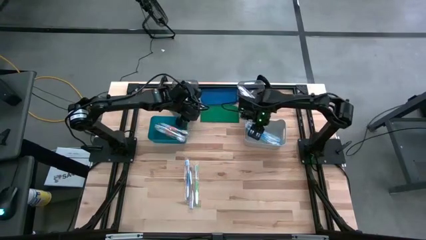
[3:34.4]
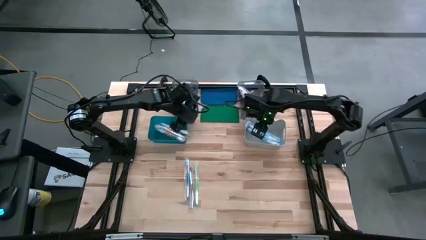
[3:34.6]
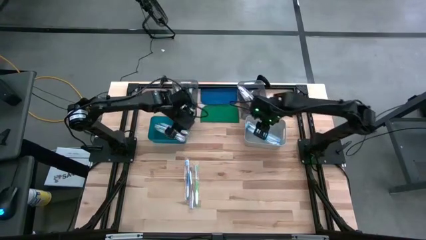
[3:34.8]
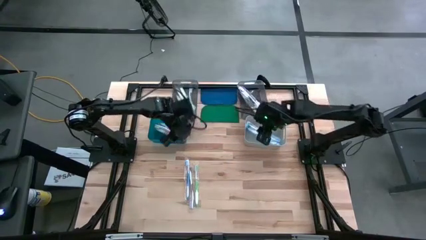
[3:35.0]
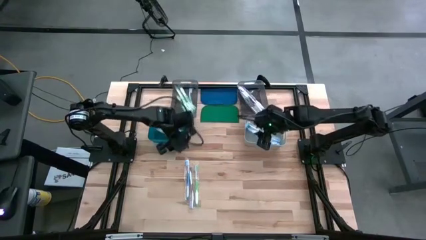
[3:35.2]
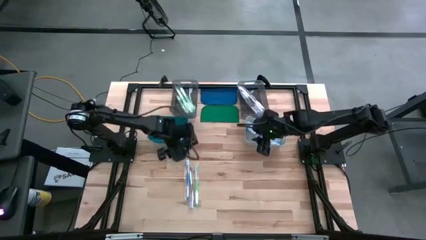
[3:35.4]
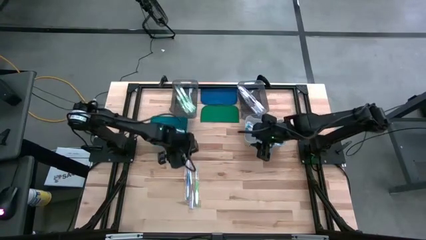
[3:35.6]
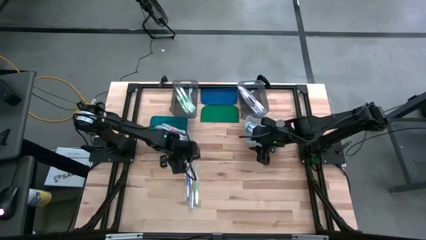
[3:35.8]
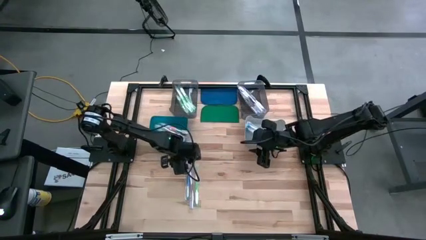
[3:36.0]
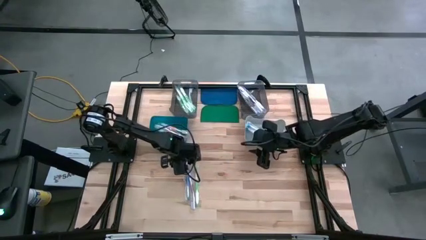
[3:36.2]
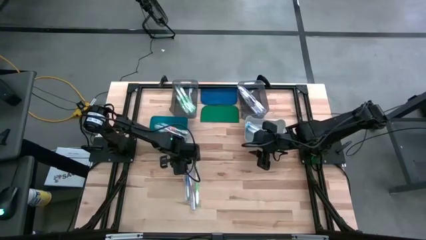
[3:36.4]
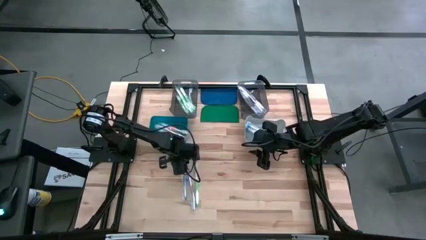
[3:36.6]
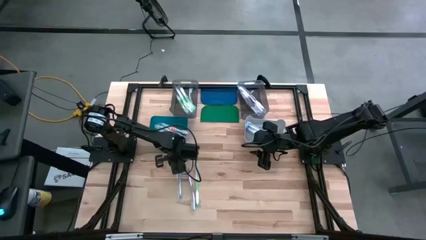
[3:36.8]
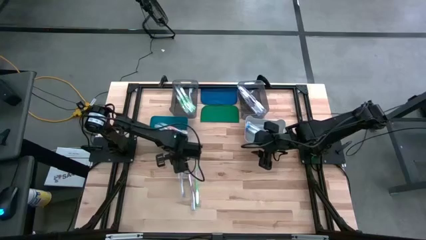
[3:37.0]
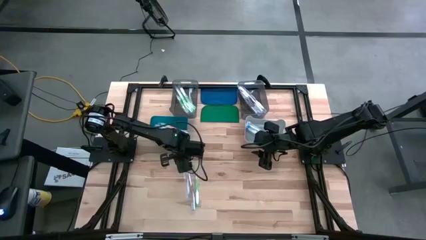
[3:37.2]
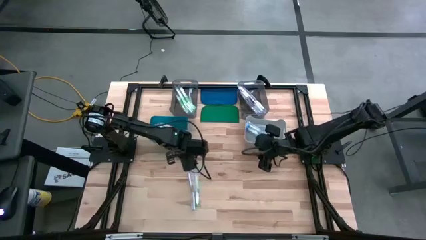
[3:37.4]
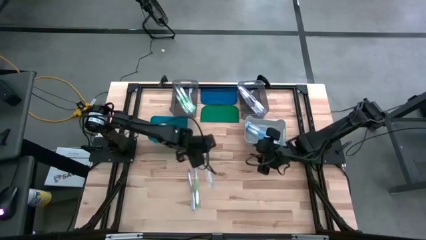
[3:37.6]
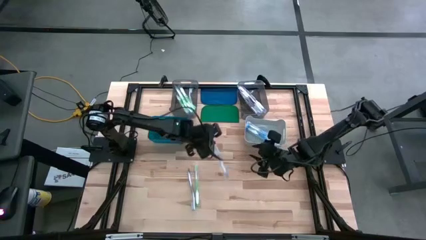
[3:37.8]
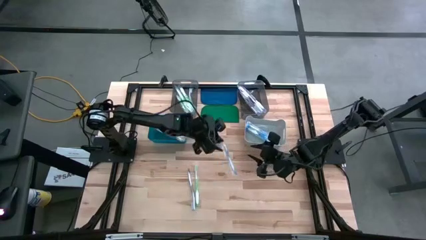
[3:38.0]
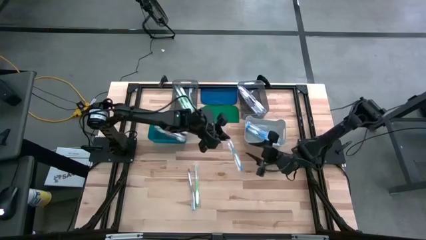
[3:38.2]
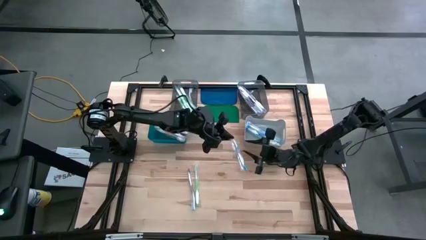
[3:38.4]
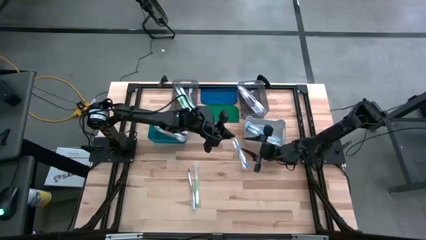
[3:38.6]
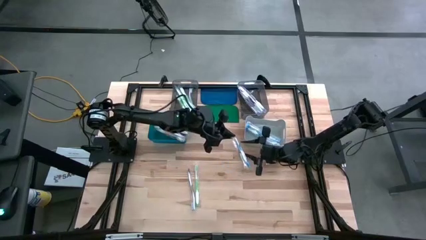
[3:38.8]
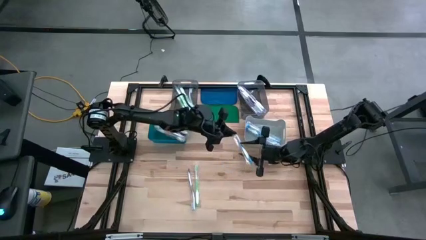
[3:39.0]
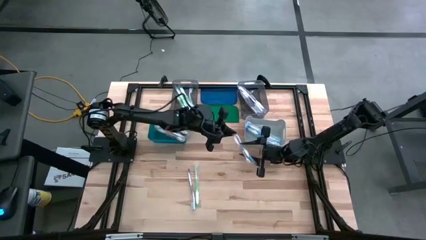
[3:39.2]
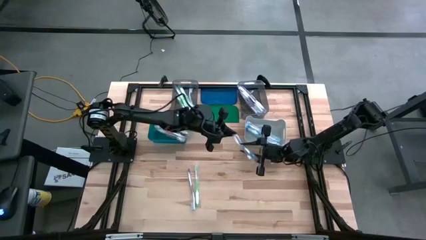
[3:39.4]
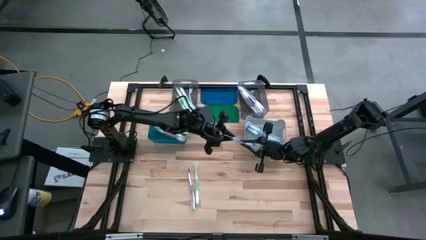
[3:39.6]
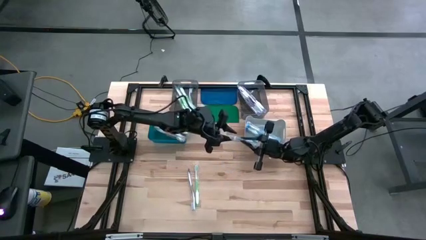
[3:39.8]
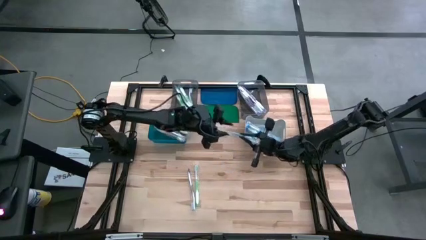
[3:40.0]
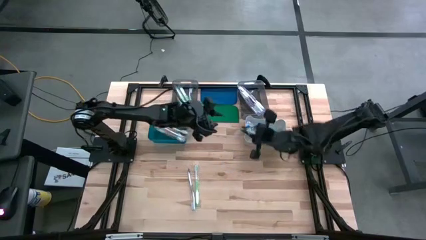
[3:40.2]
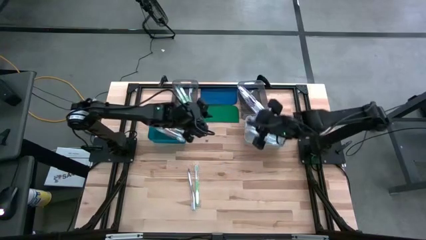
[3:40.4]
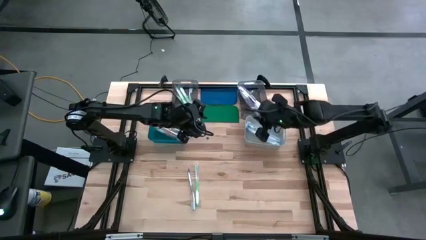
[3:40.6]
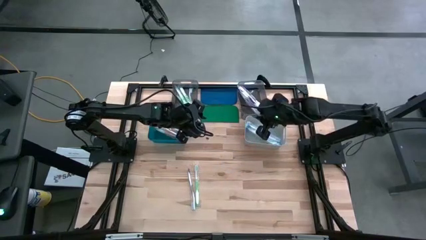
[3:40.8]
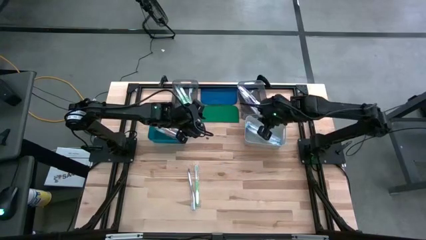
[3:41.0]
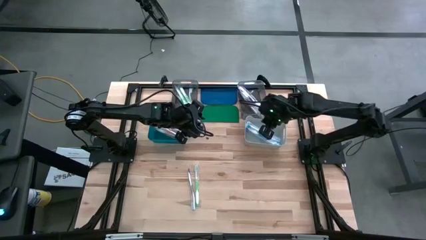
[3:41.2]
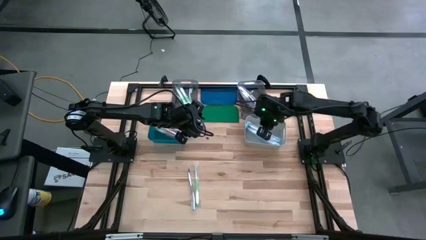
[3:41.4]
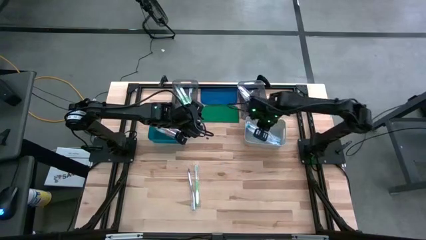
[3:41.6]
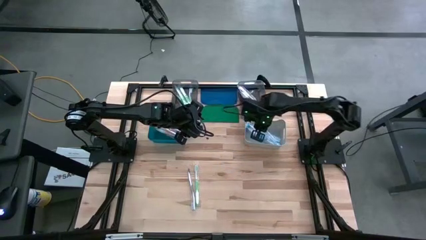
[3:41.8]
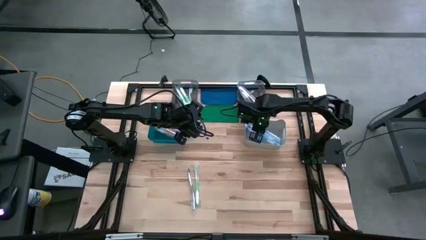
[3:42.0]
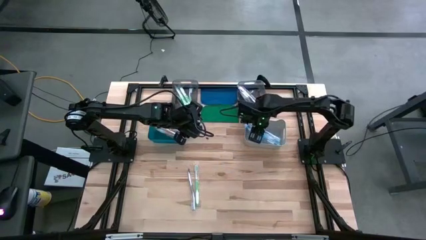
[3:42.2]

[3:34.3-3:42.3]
Task: Pick & Place Toothbrushes
Put the blue toothbrush into the grey bin

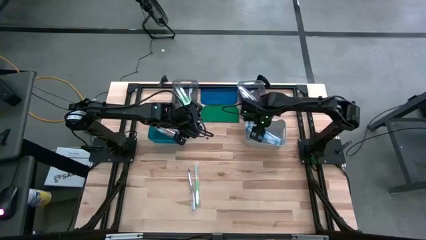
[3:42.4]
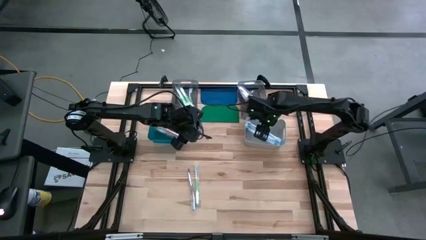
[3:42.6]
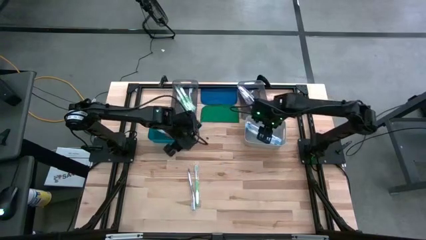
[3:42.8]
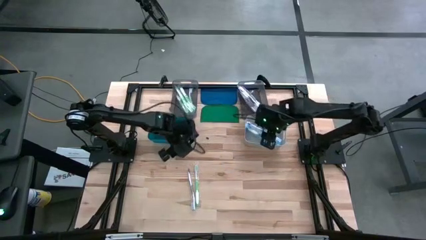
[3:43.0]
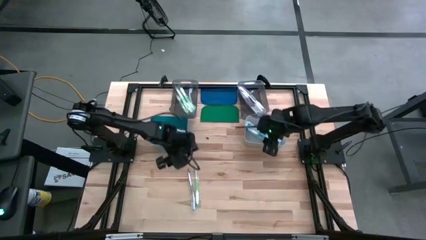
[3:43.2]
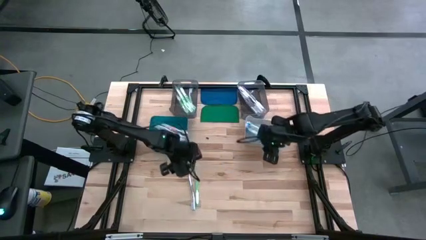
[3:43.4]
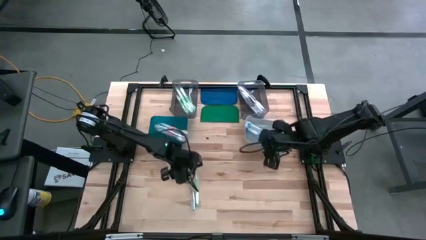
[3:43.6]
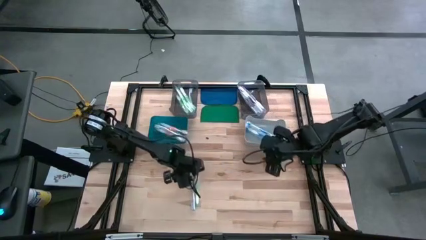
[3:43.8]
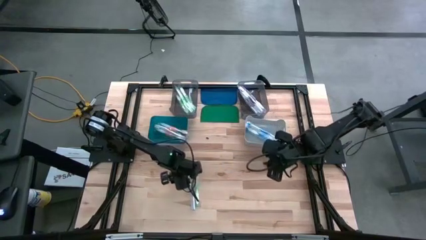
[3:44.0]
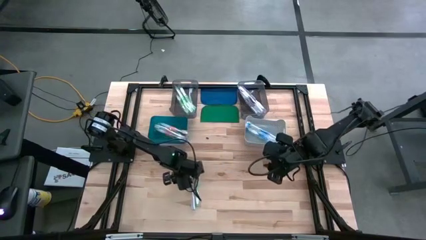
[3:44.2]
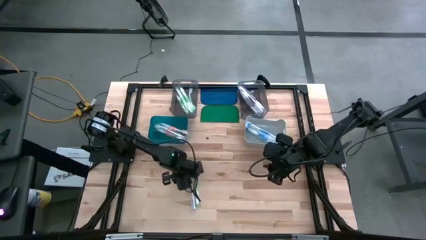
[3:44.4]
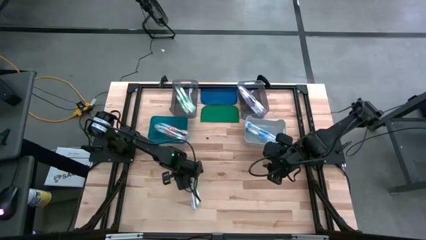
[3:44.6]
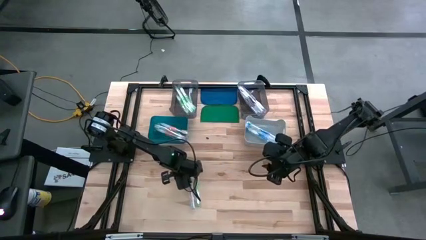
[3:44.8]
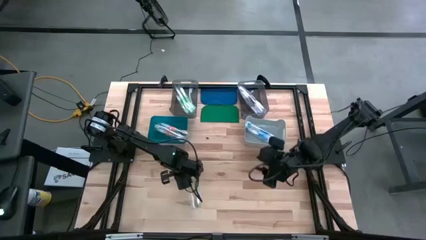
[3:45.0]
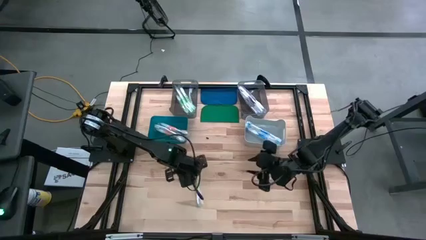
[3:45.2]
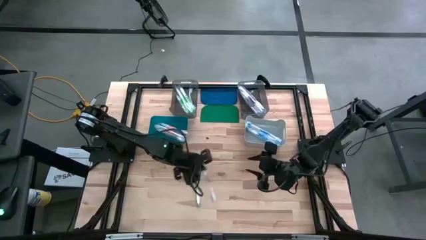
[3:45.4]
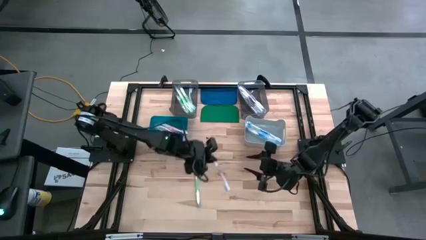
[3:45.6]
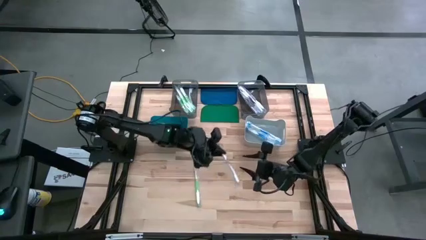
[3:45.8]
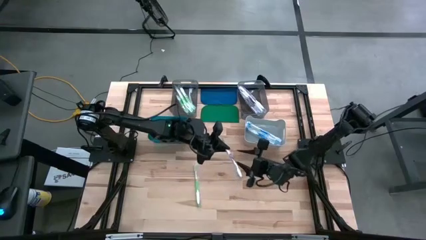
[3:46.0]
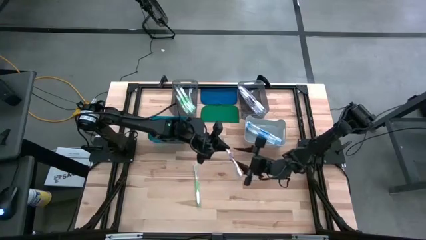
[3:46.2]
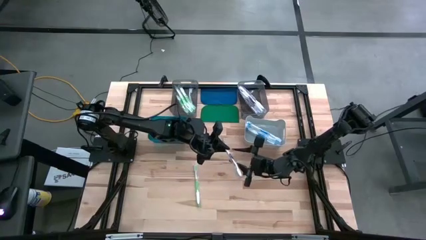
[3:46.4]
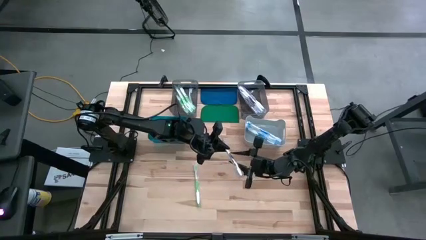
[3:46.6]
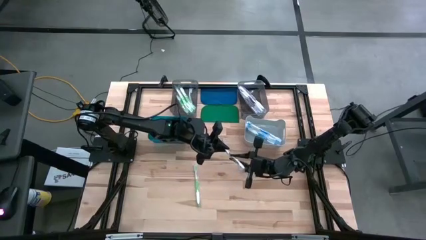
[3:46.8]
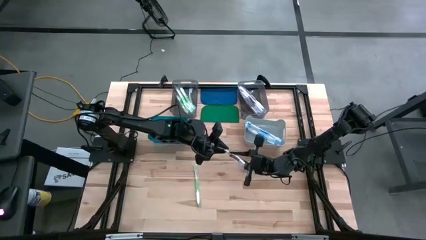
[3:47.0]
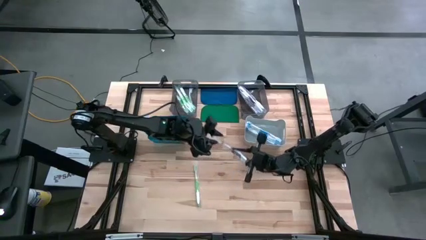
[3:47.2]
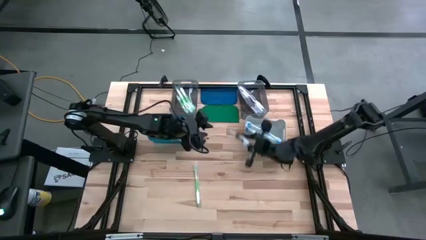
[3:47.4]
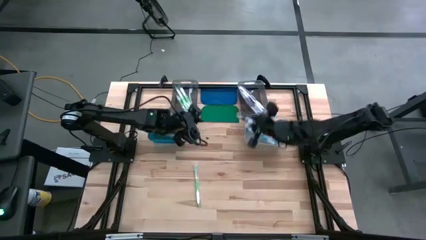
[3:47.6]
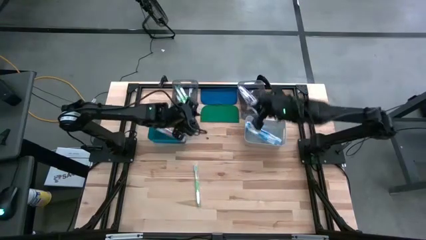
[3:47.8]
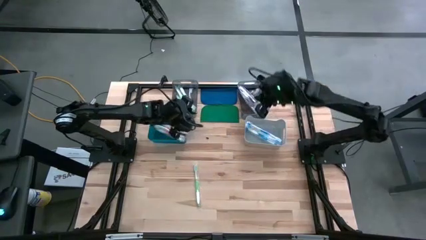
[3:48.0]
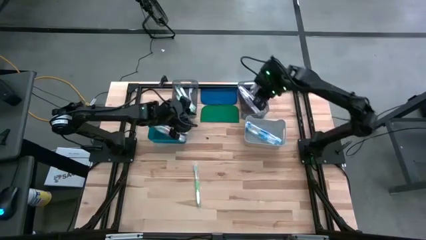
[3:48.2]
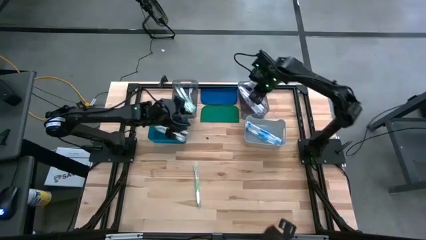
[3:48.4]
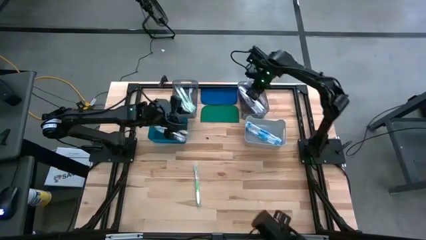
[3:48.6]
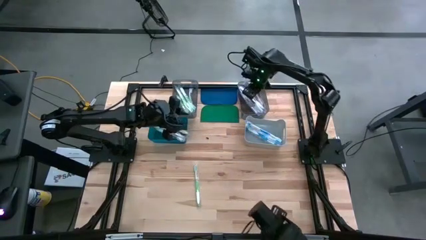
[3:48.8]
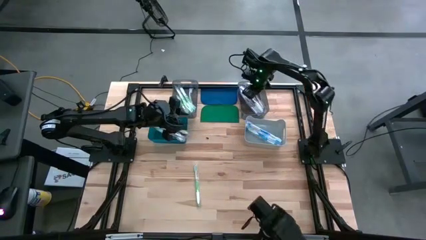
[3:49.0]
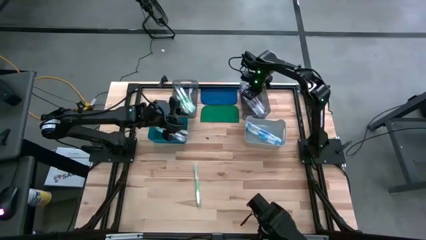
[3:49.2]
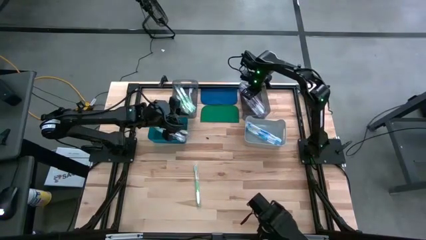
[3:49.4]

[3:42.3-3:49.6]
Put the violet toothbrush into the right black bin
